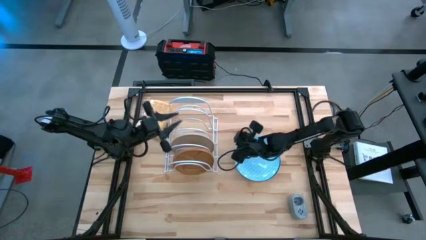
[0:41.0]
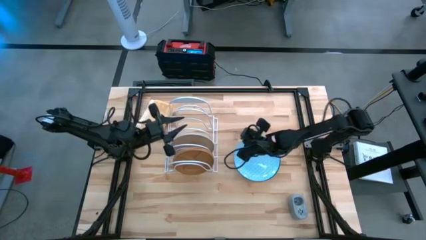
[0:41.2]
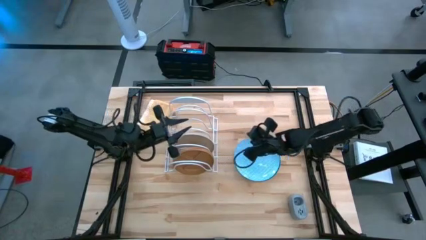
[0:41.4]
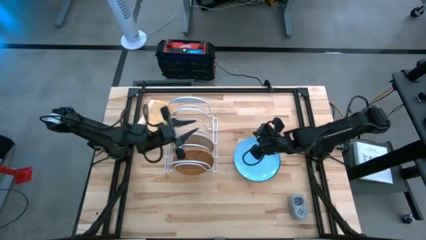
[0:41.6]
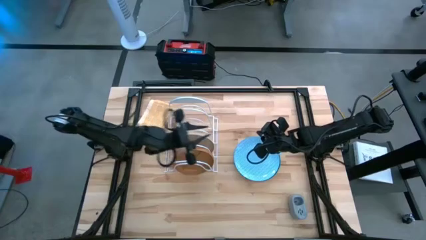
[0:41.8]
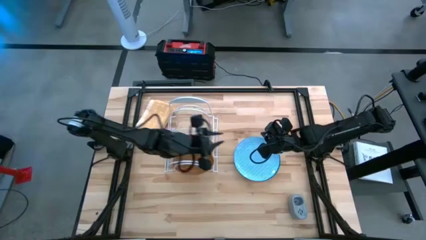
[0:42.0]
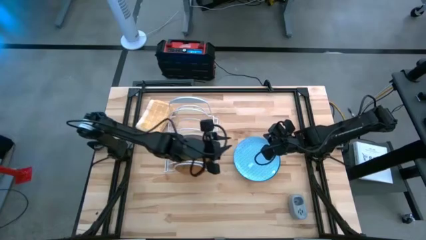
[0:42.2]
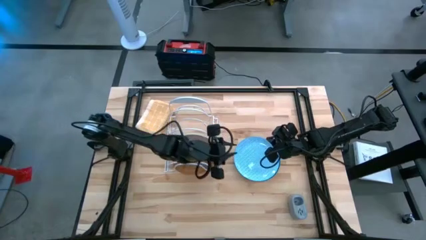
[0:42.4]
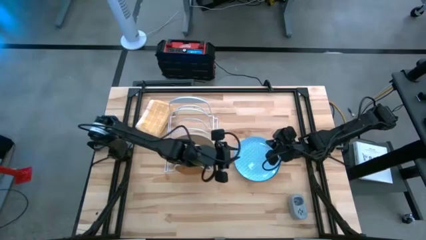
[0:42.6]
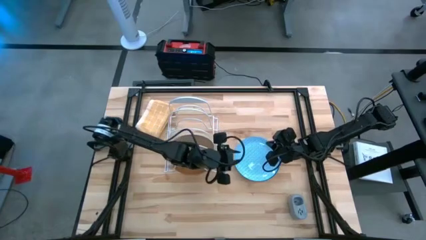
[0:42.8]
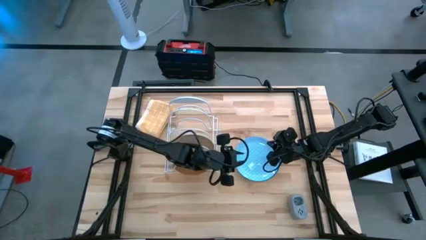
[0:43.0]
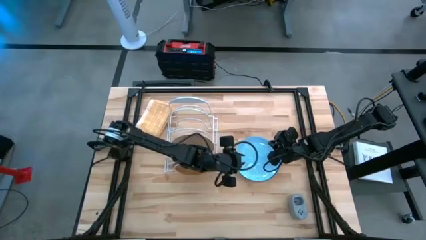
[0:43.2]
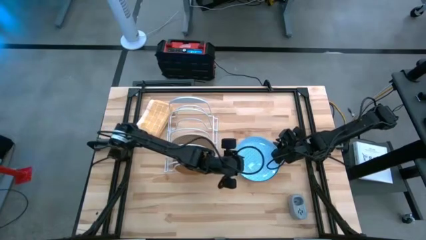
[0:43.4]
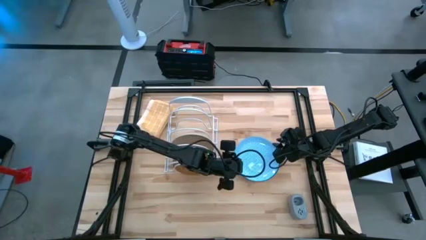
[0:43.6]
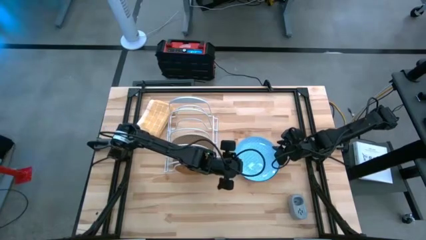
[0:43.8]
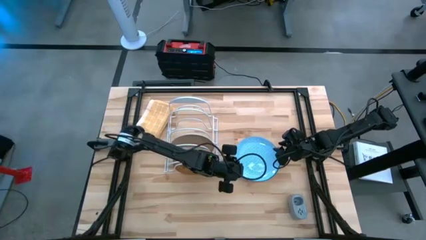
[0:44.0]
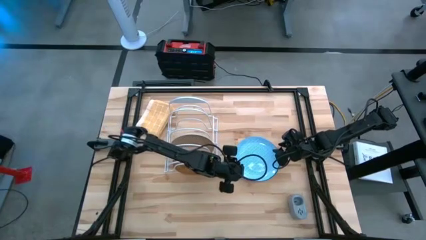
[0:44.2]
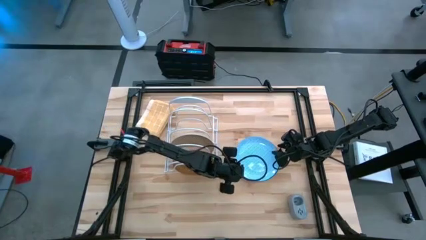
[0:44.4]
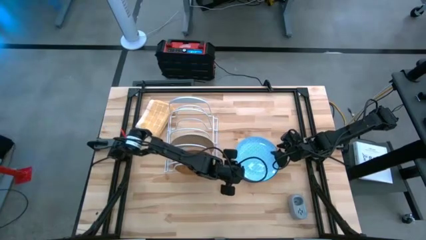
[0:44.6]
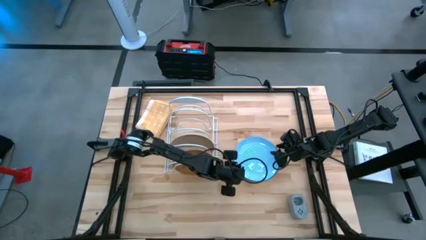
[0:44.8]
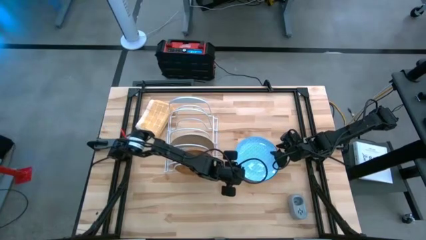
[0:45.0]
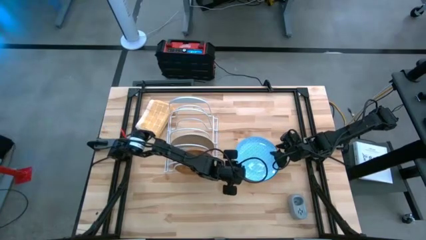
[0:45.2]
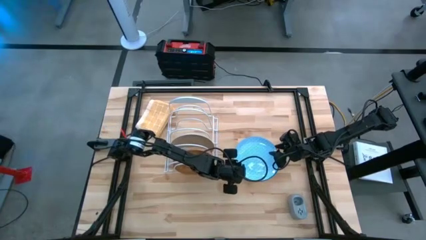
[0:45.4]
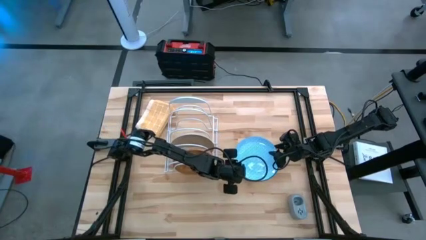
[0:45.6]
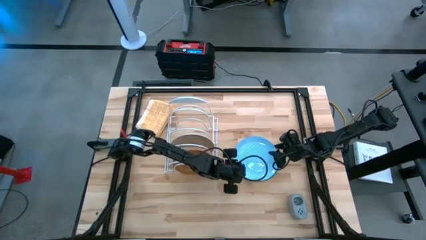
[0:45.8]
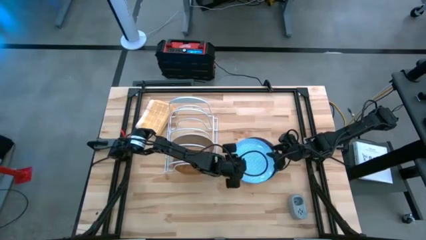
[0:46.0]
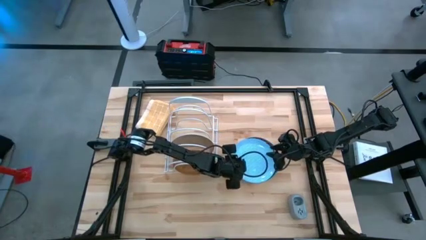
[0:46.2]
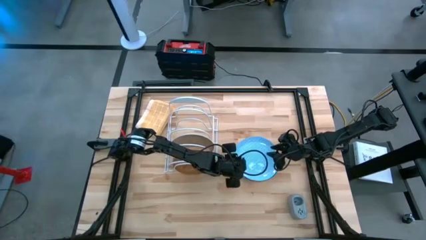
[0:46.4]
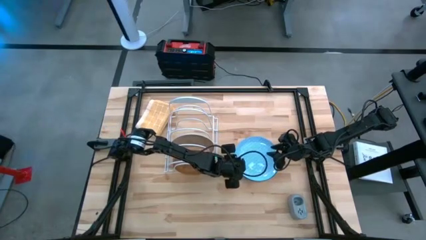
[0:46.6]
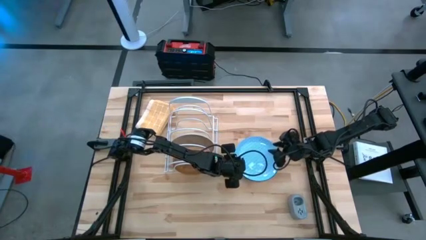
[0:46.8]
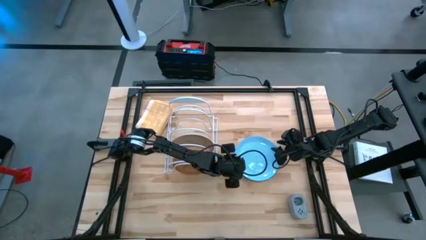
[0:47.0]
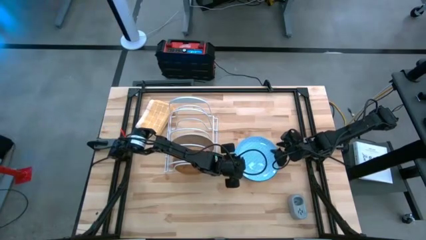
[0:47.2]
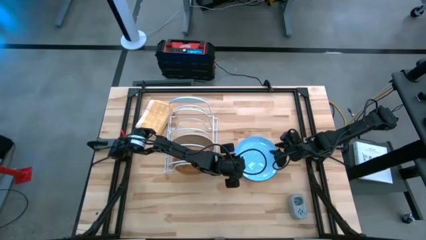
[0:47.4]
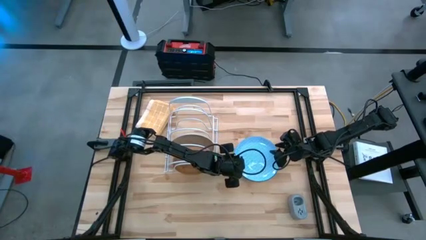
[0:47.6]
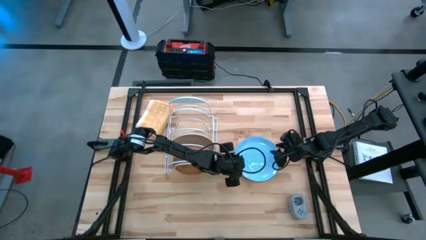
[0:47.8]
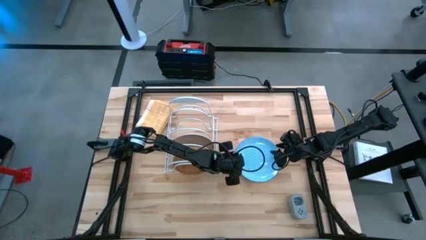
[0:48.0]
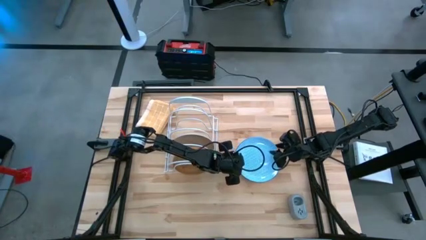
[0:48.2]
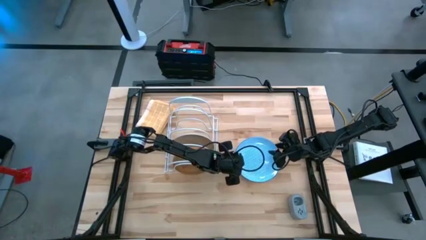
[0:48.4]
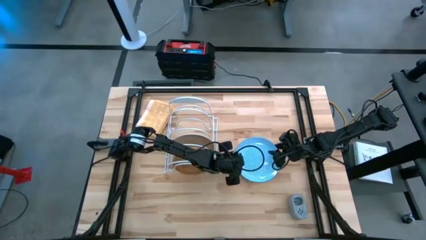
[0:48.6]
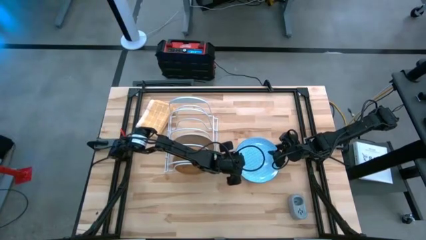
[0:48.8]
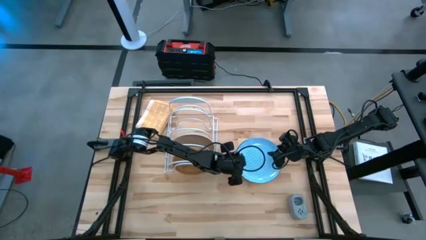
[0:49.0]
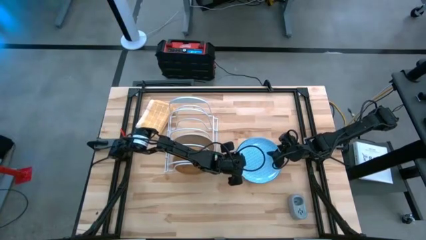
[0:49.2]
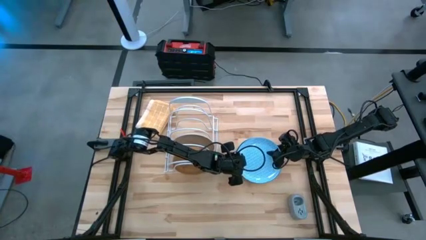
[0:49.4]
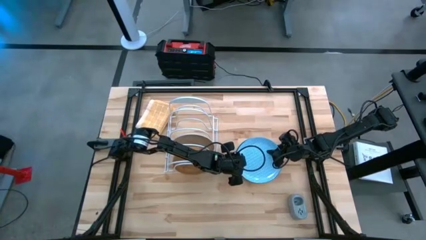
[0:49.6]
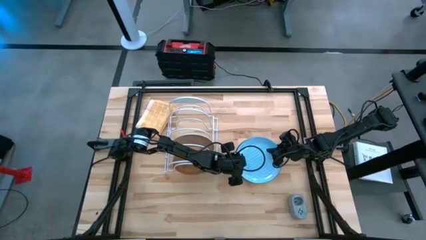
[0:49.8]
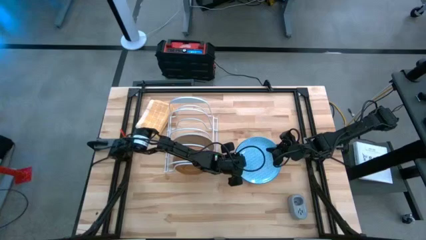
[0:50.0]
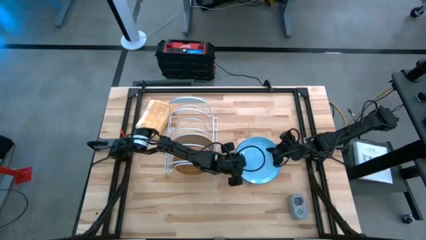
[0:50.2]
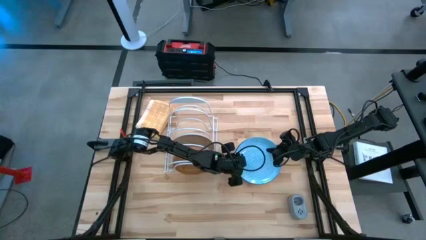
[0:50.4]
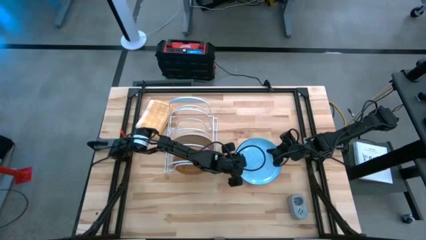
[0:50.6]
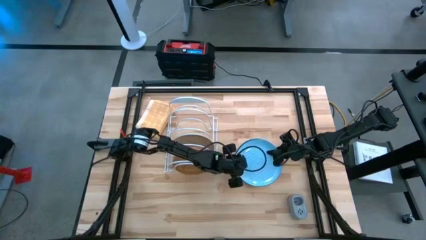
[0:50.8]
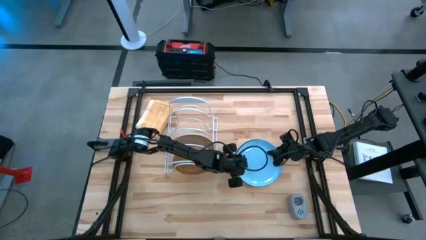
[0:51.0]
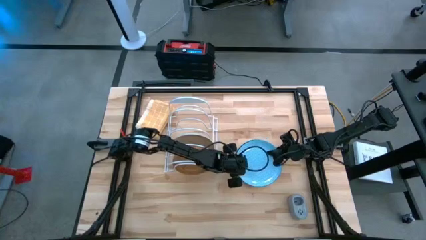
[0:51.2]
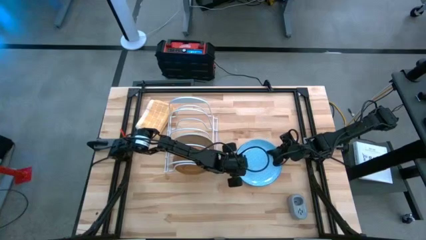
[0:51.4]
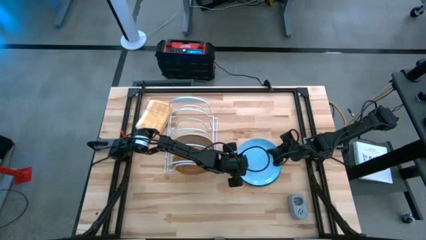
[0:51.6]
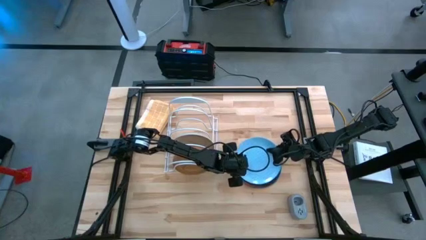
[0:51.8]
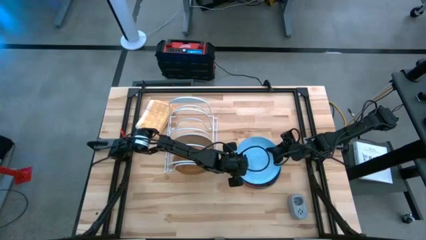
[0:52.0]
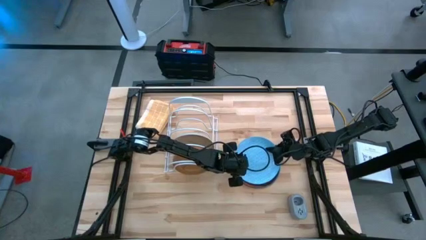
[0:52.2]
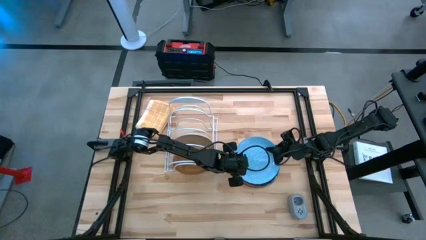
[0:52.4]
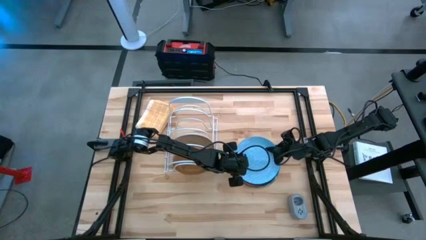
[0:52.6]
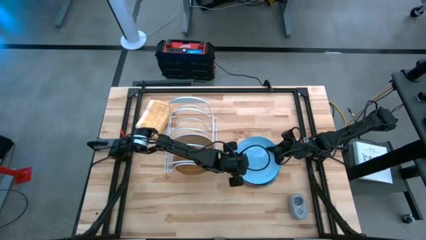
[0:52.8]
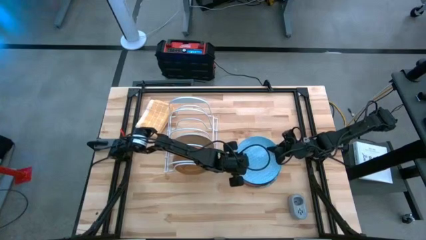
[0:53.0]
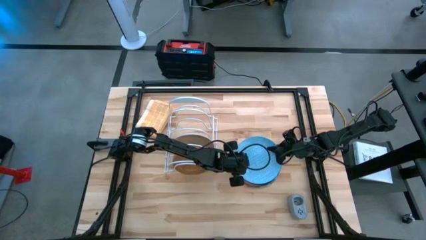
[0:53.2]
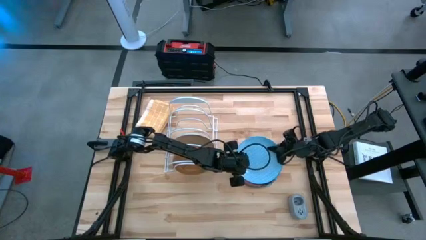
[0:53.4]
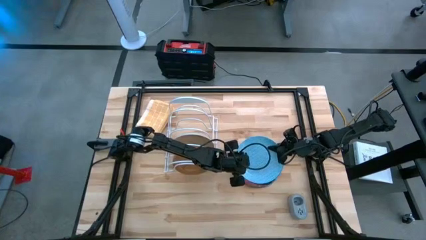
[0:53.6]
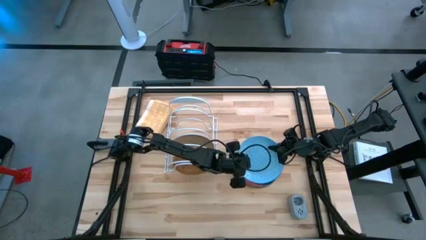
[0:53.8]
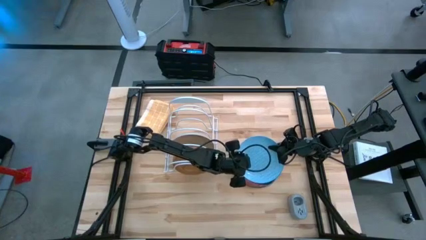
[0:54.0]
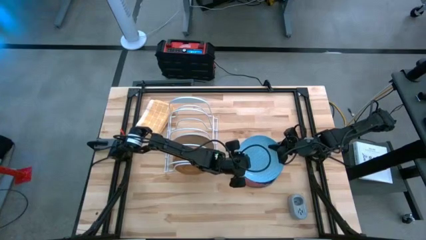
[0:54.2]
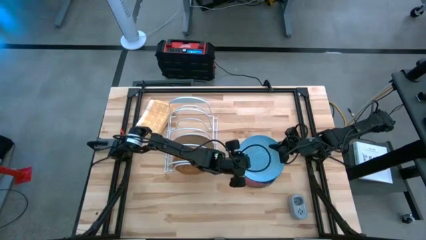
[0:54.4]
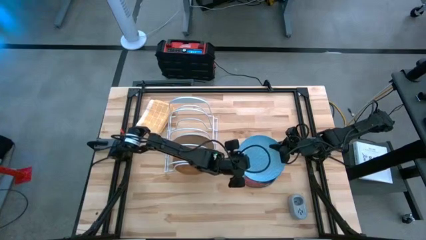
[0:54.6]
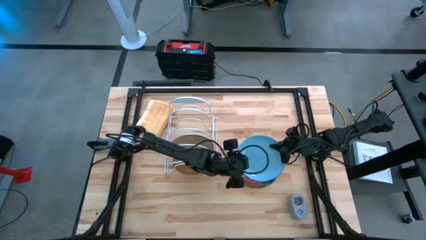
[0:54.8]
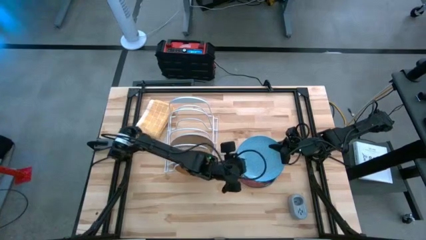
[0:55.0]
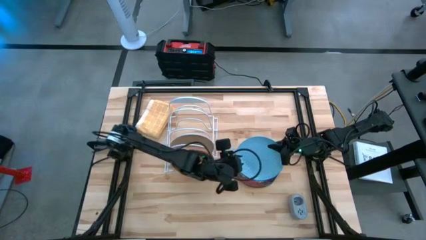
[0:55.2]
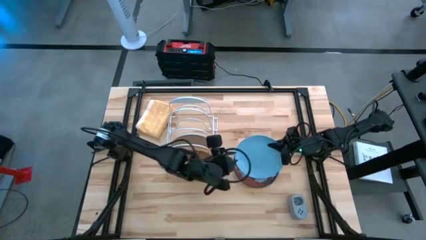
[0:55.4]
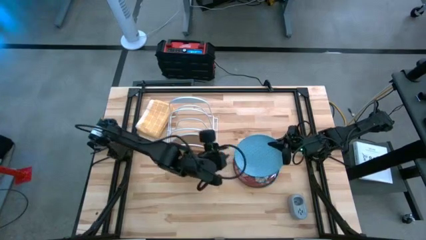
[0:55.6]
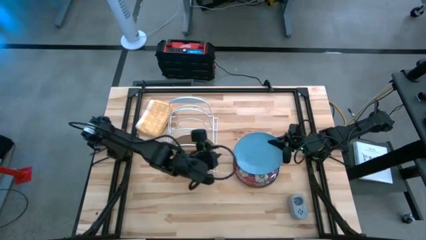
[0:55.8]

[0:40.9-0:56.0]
Task: Sort dishes
Put the blue plate into the dishwasher rack
